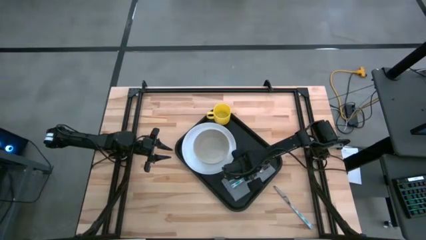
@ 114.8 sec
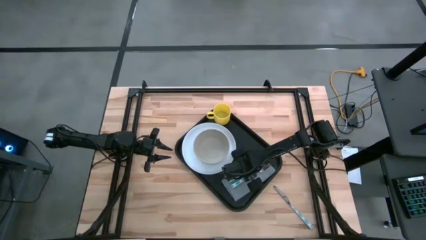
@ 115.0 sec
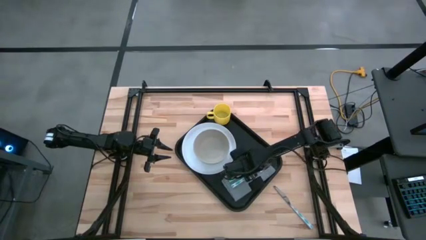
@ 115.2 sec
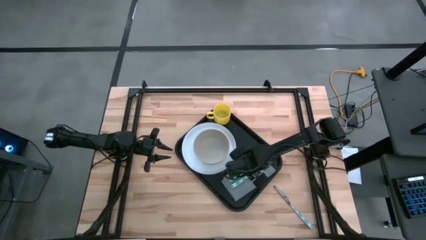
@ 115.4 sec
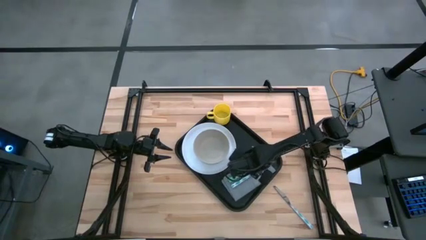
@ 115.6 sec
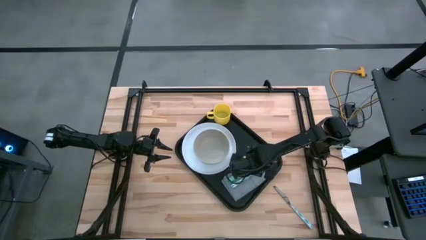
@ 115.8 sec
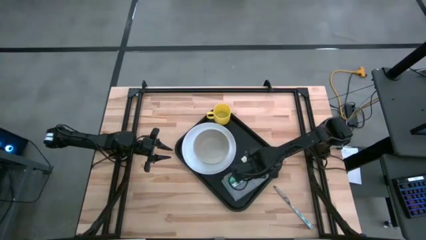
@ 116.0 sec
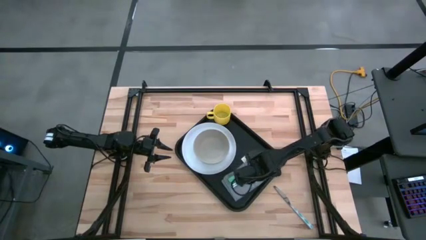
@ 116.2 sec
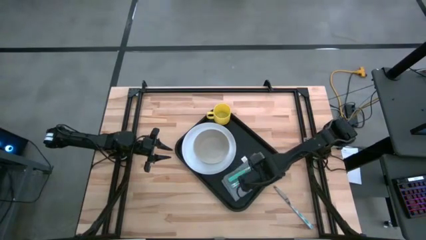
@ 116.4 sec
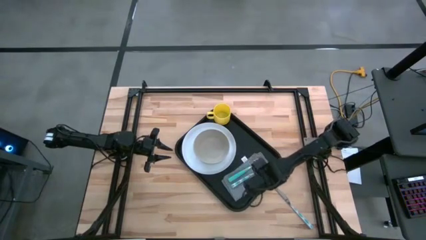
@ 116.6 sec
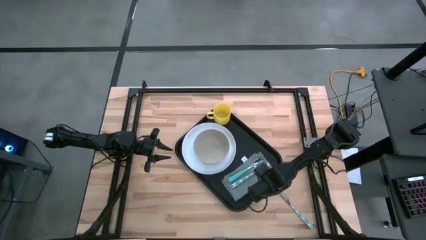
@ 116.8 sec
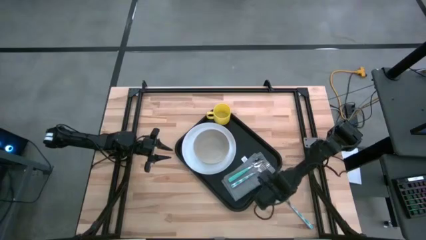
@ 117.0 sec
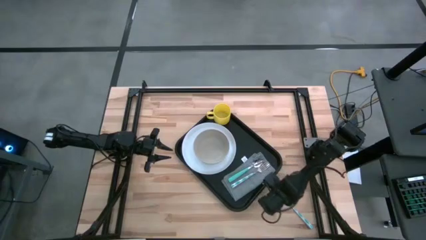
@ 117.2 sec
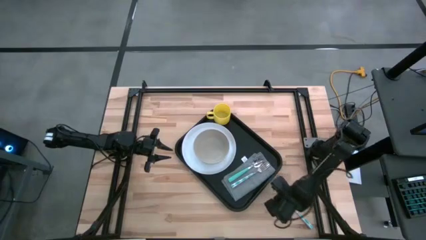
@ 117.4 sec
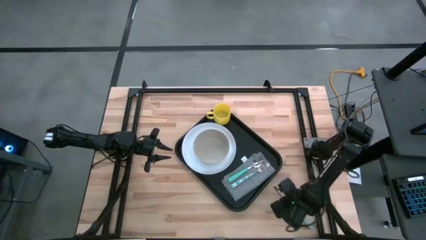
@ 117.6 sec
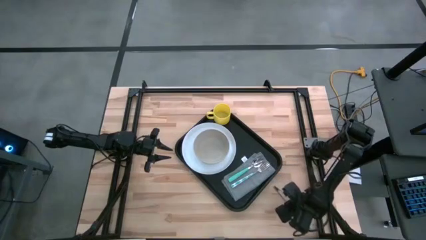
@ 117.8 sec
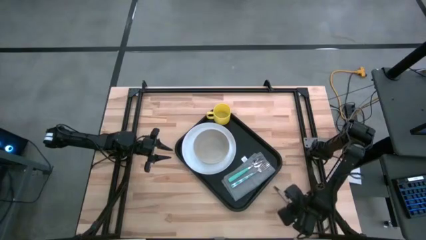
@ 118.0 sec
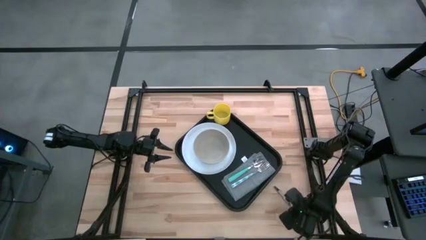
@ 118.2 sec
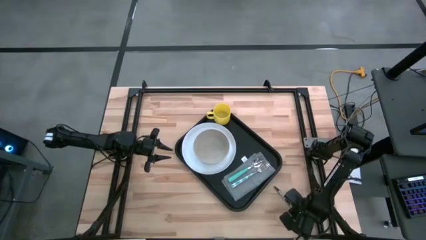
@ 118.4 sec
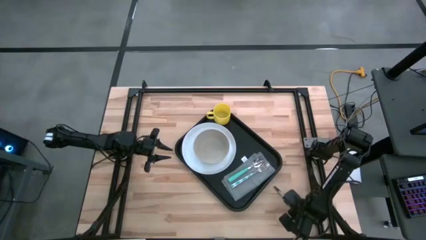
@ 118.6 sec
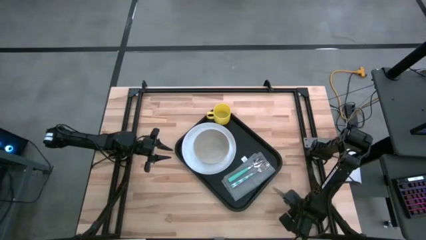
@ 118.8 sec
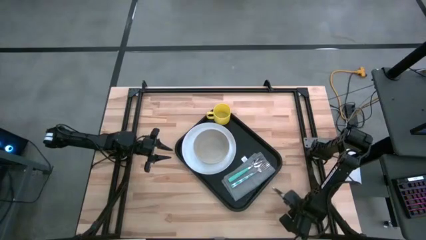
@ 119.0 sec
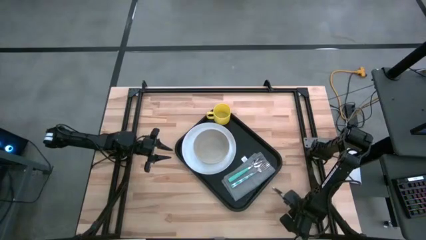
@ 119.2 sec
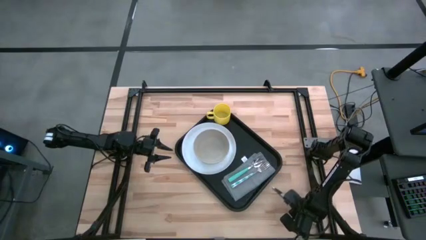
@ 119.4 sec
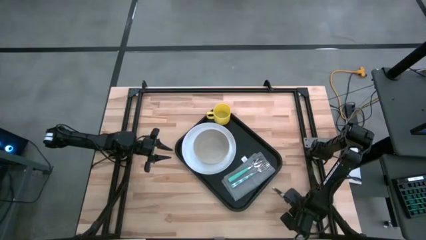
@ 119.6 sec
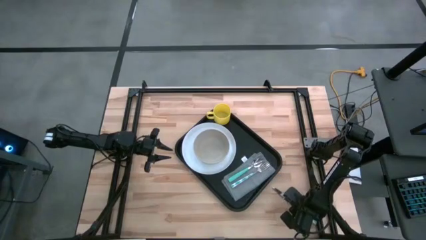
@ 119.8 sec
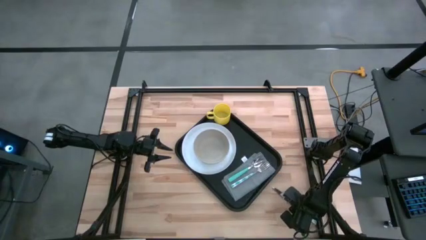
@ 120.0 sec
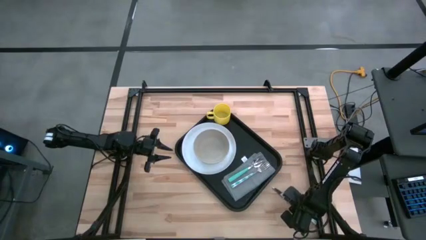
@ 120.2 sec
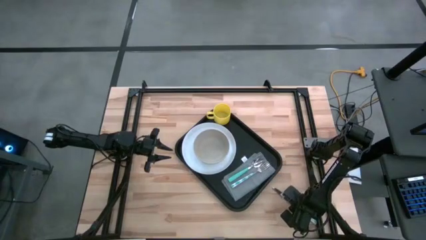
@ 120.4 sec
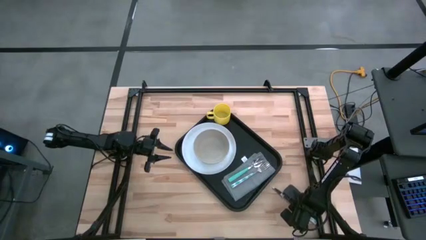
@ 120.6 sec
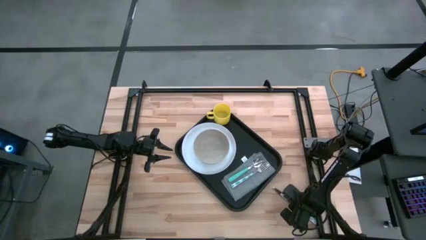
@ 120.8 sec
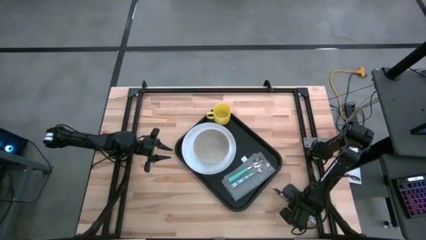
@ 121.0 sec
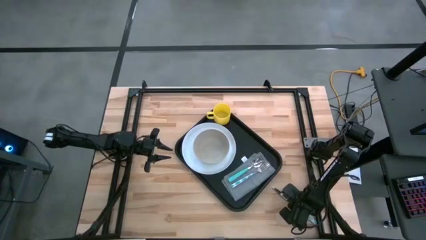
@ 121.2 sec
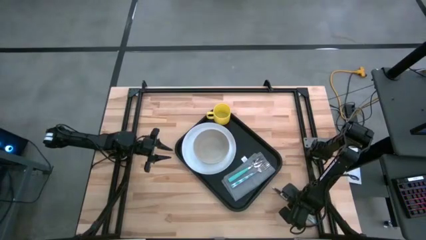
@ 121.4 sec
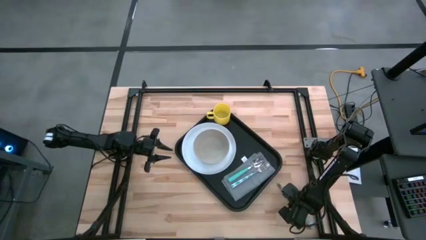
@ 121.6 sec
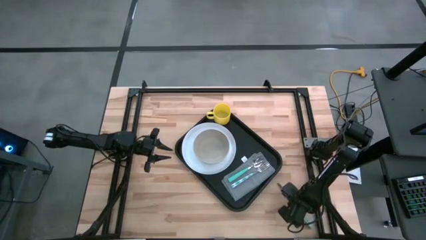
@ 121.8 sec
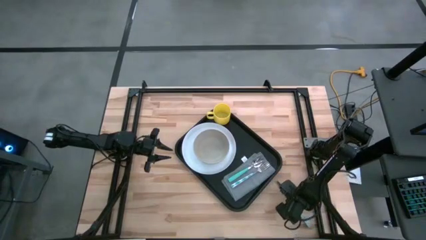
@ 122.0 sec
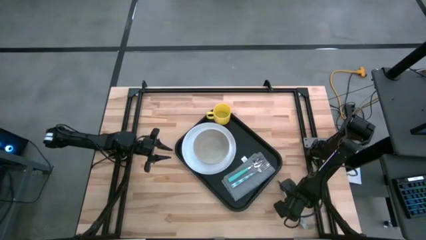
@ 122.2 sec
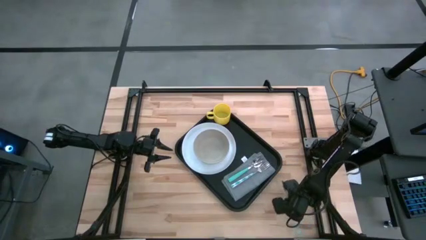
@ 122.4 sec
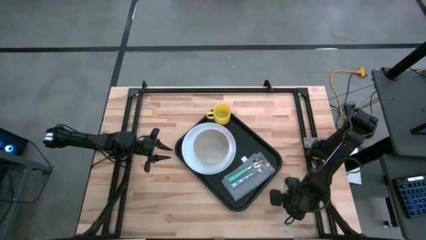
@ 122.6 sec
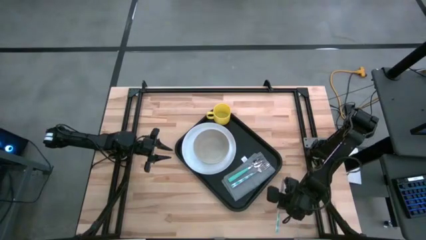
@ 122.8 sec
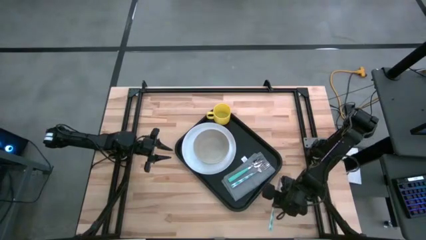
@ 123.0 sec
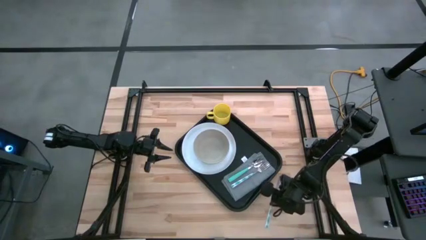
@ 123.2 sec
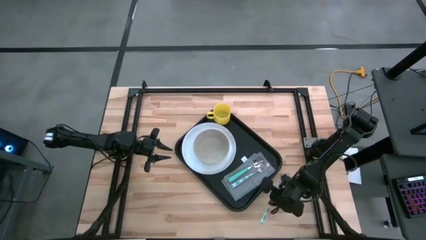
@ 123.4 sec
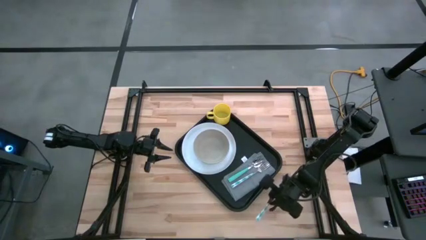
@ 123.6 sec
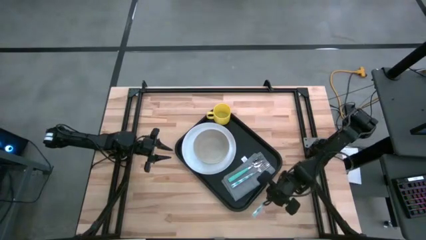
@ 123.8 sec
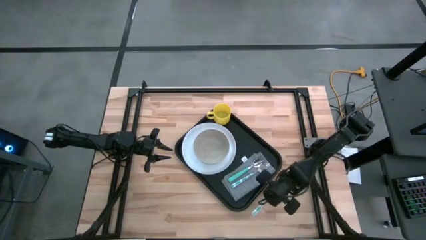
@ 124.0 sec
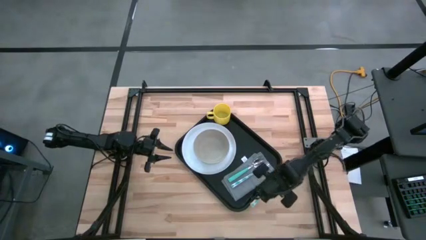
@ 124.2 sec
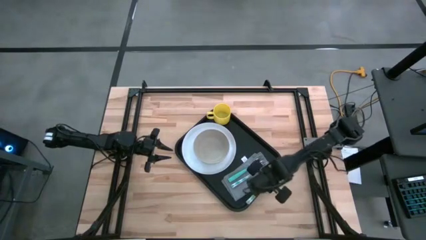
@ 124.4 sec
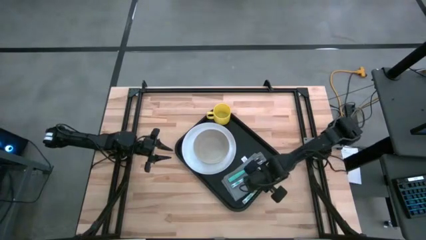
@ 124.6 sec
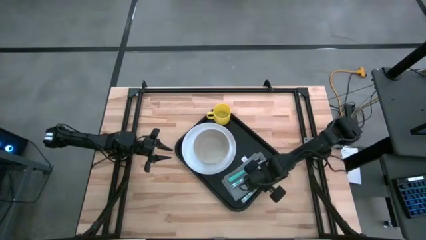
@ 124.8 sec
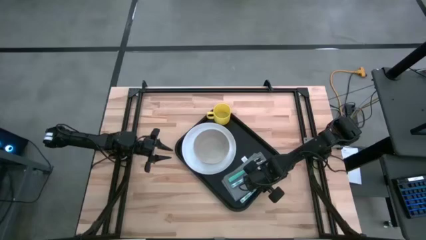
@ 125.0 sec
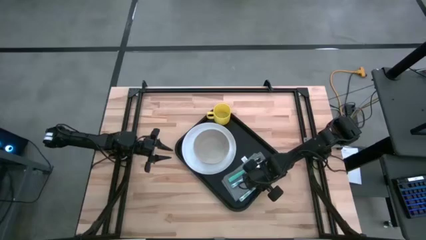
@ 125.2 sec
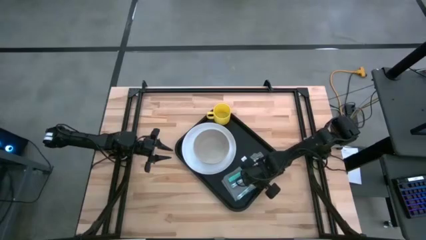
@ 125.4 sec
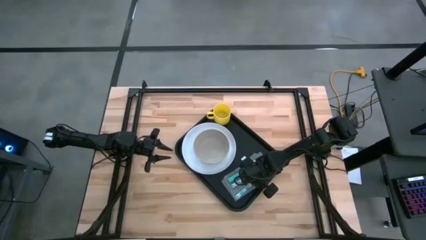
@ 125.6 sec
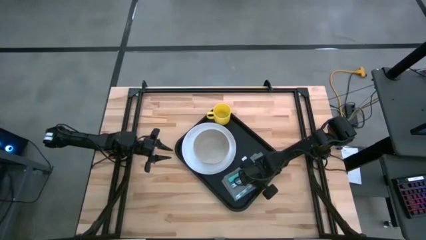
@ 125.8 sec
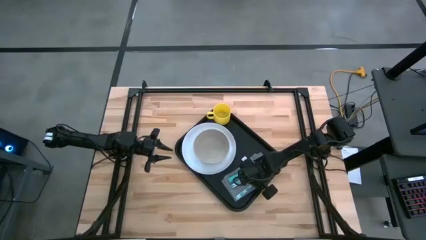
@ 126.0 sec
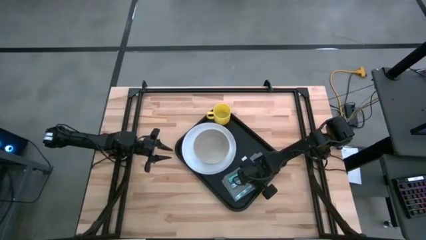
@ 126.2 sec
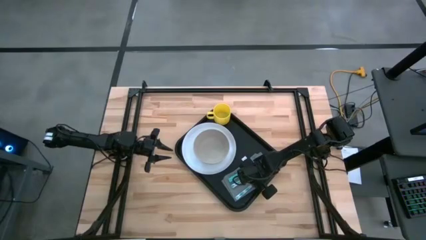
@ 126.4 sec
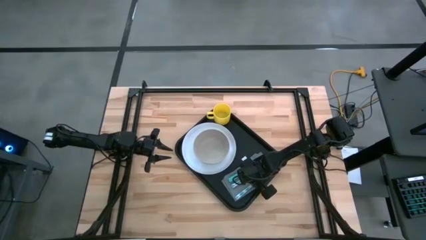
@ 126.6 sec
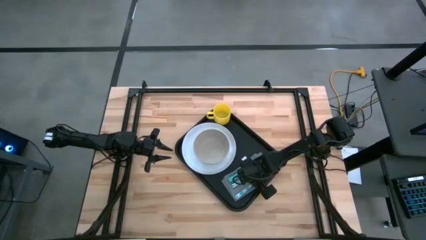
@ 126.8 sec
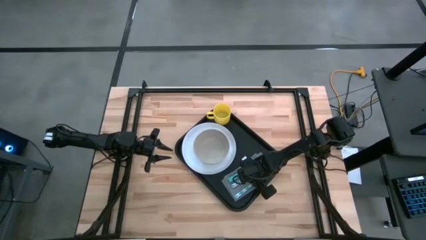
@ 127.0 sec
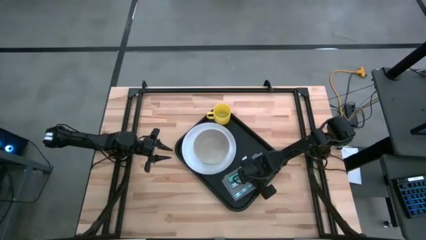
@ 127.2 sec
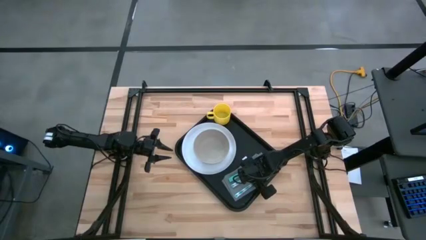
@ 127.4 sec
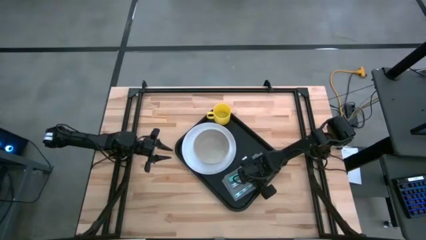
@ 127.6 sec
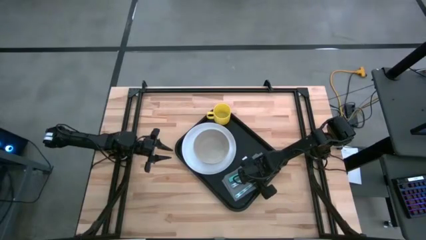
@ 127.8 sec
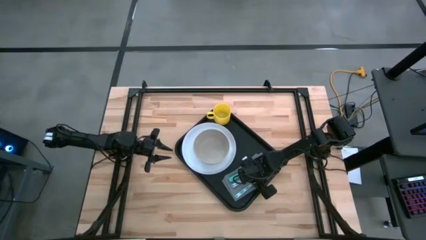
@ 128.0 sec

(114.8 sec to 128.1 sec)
Task: Set up tray
Put the white and blue knife to the right of the white and blue fork on the gray napkin on the black tray

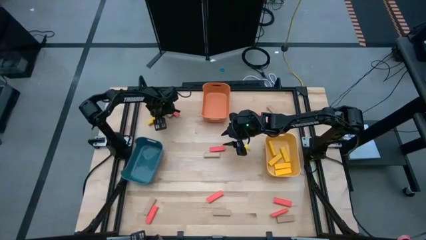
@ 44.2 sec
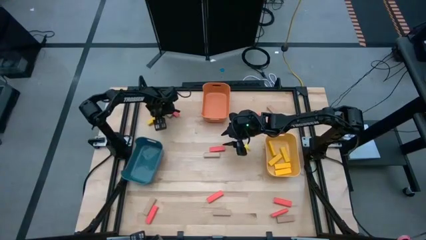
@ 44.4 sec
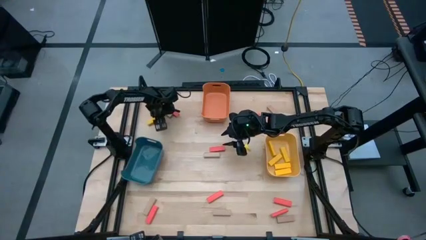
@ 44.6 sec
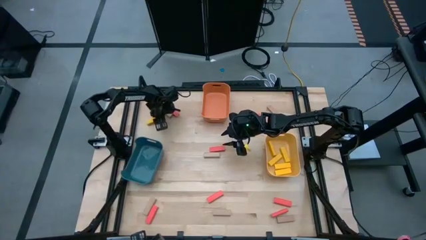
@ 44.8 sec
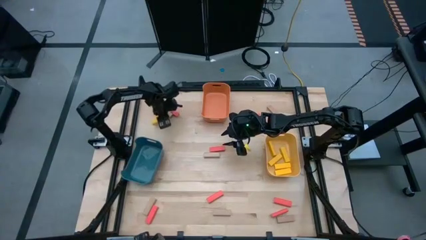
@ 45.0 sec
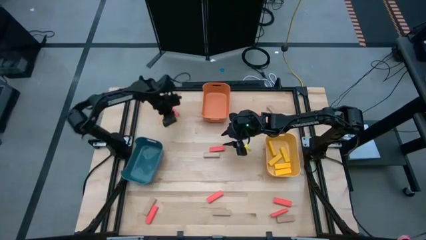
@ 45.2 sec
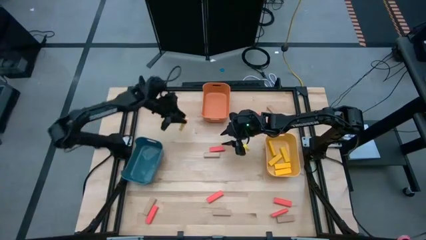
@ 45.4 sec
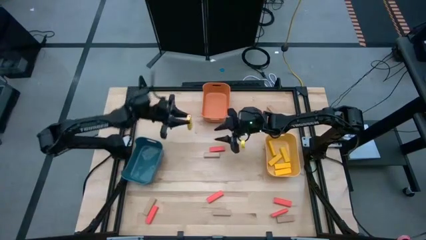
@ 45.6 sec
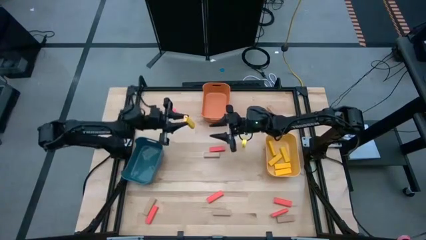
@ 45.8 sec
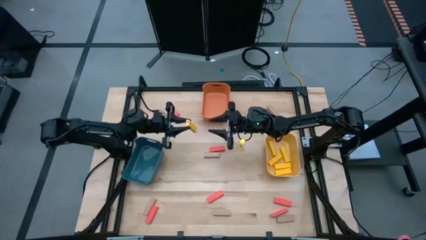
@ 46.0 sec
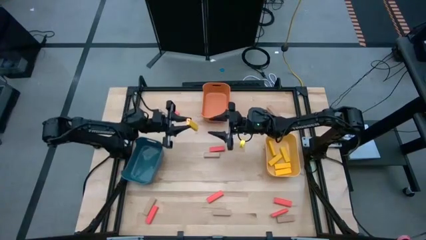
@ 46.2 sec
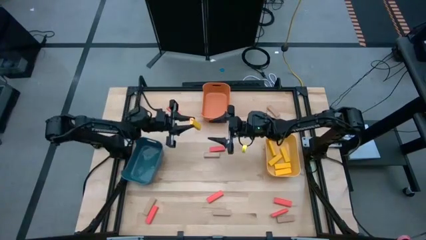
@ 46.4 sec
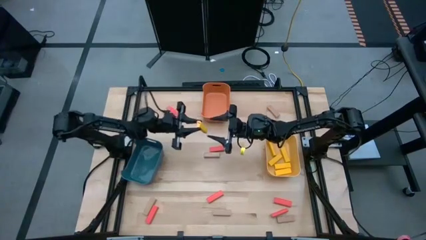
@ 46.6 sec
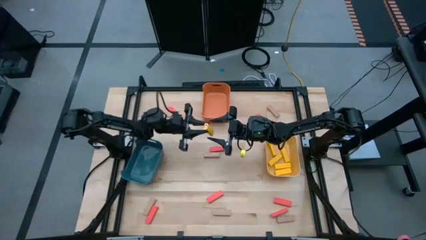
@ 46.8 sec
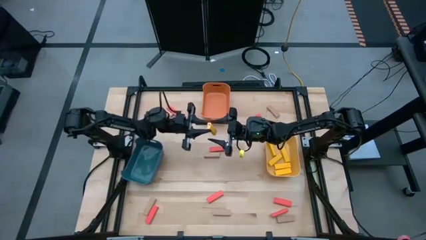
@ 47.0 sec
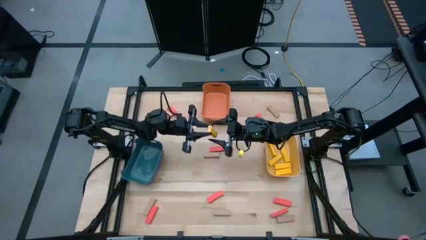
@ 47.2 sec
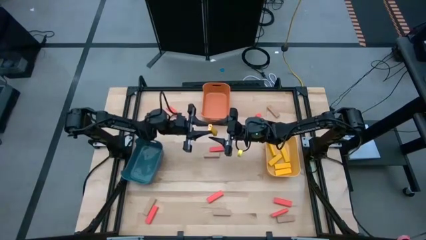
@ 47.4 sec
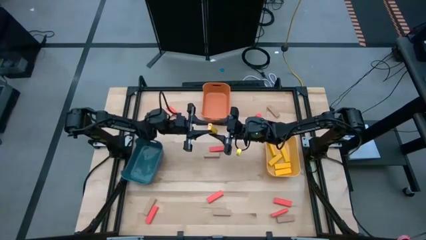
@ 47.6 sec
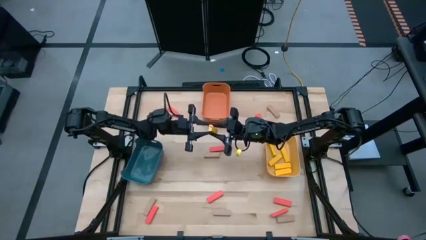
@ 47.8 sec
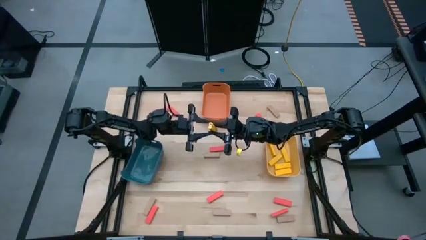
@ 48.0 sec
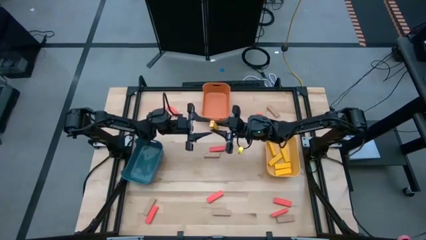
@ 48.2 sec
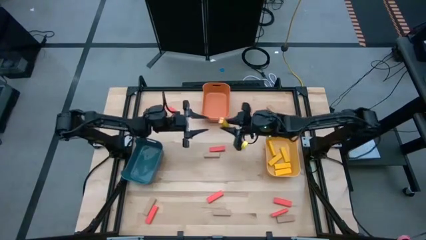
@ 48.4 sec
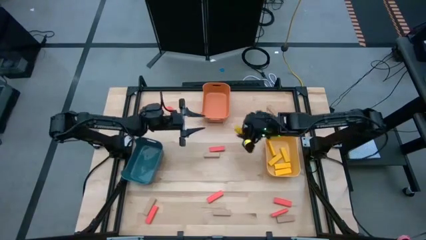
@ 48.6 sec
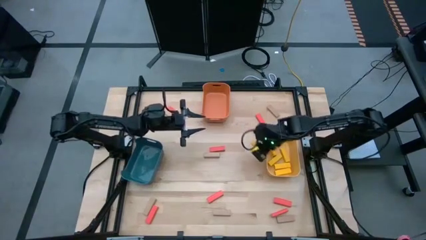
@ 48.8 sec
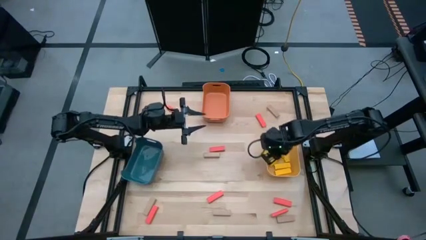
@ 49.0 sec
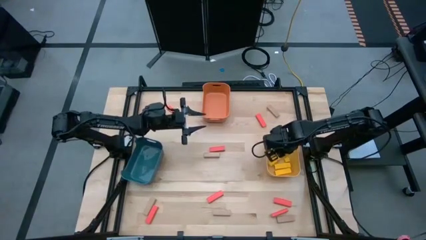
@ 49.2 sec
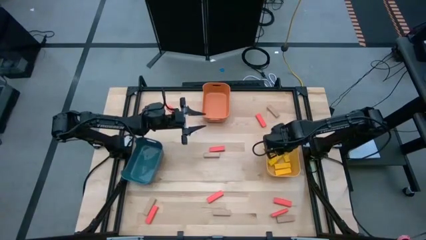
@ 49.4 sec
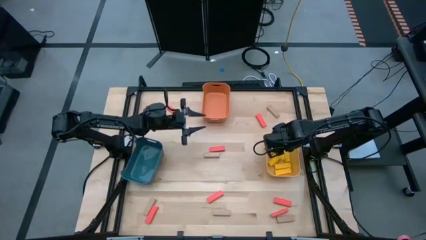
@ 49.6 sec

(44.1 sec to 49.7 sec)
Task: Sort blocks
Put the yellow block into the yellow bin
